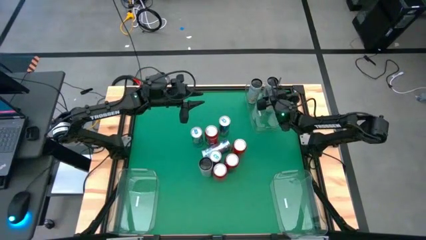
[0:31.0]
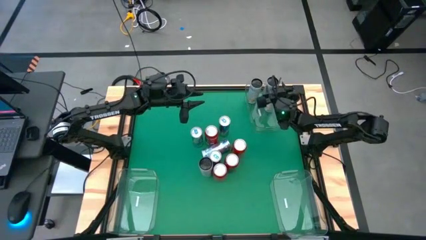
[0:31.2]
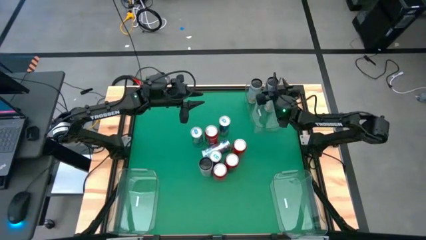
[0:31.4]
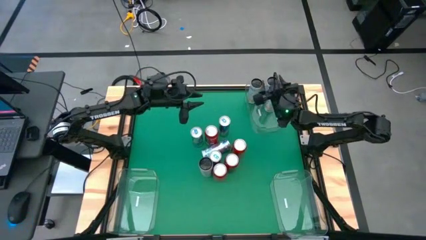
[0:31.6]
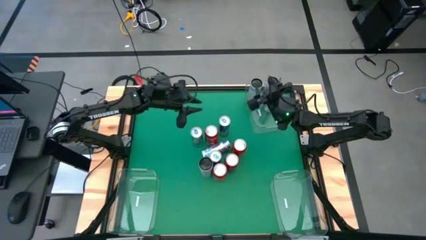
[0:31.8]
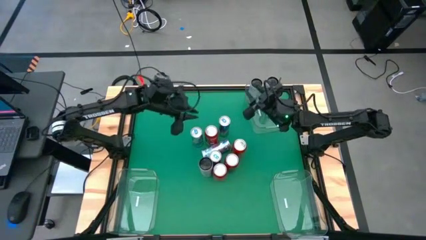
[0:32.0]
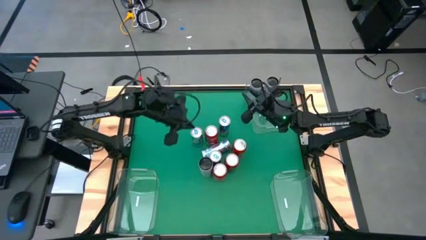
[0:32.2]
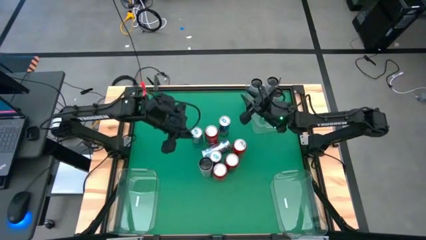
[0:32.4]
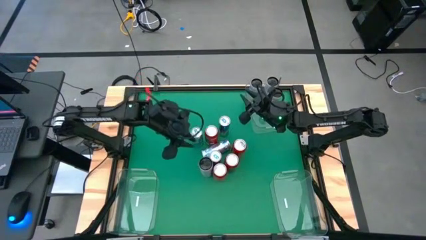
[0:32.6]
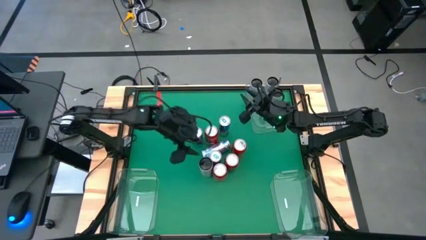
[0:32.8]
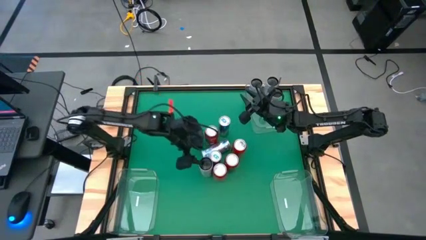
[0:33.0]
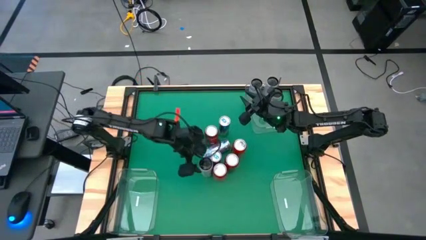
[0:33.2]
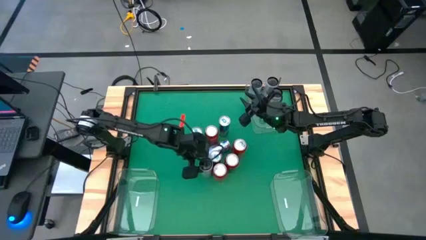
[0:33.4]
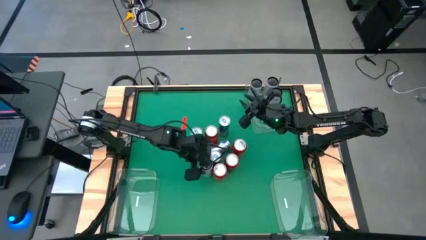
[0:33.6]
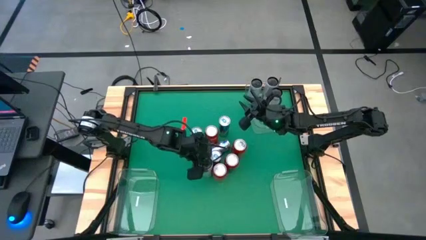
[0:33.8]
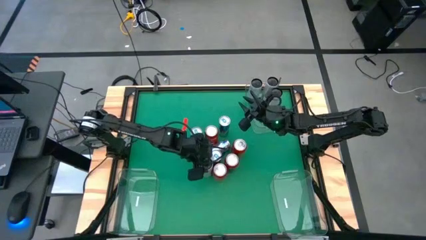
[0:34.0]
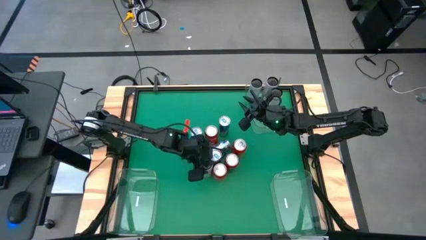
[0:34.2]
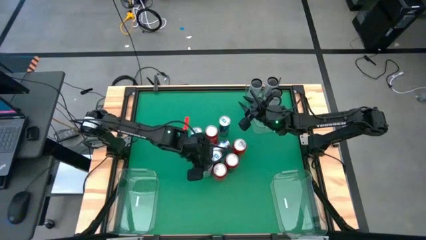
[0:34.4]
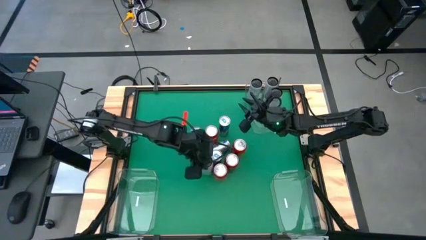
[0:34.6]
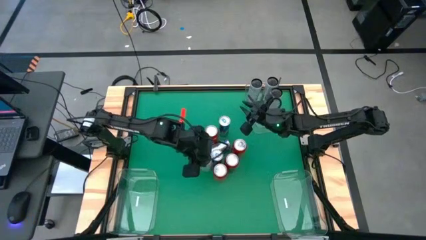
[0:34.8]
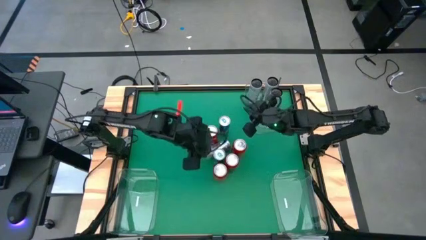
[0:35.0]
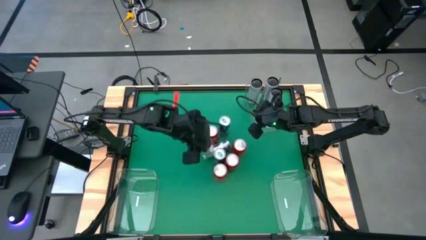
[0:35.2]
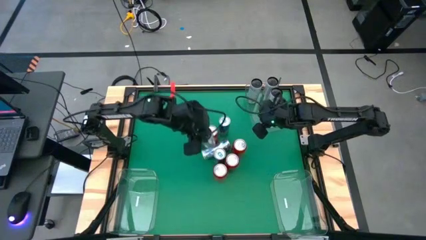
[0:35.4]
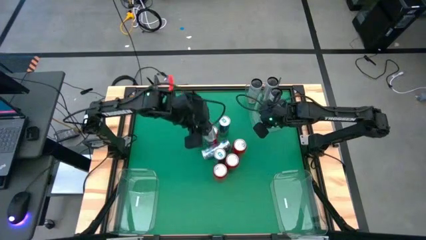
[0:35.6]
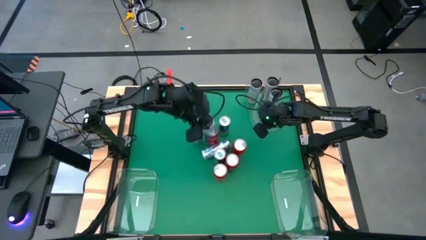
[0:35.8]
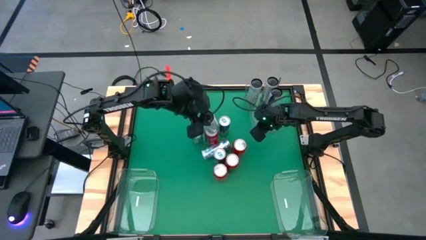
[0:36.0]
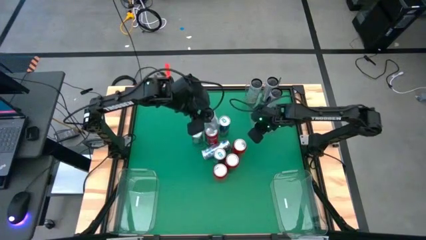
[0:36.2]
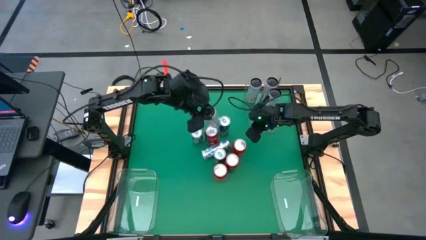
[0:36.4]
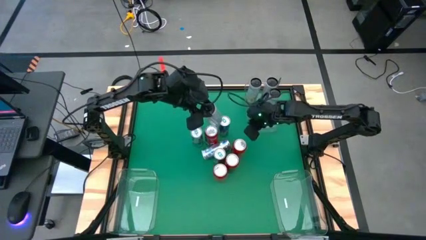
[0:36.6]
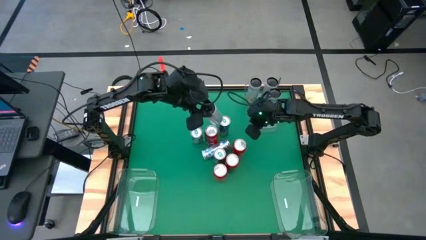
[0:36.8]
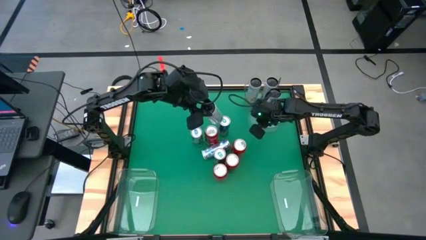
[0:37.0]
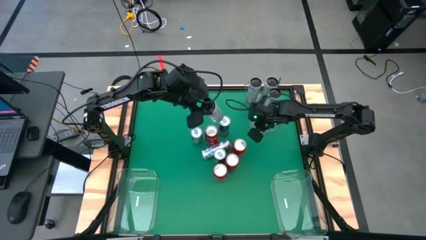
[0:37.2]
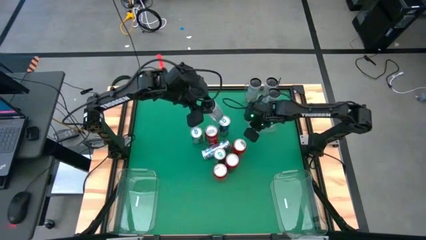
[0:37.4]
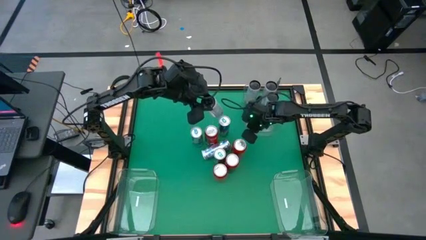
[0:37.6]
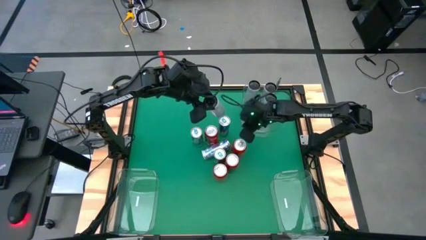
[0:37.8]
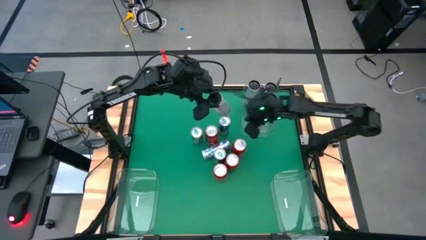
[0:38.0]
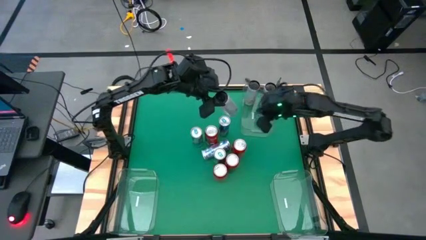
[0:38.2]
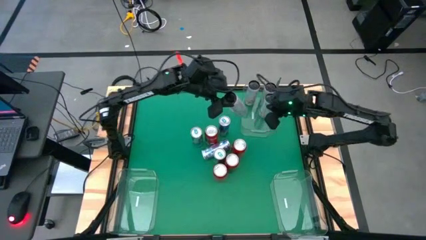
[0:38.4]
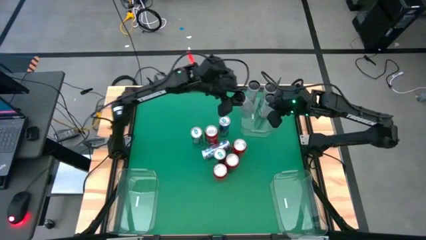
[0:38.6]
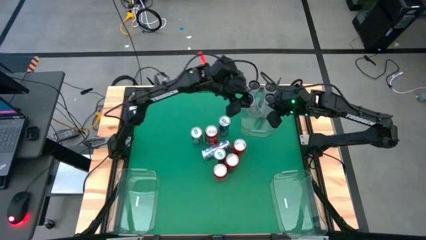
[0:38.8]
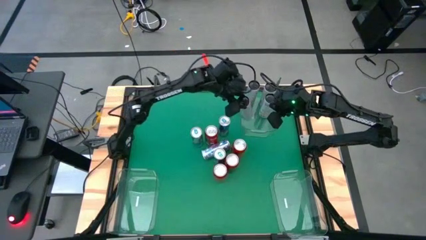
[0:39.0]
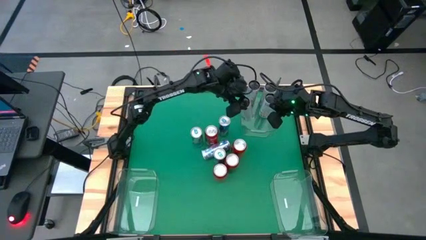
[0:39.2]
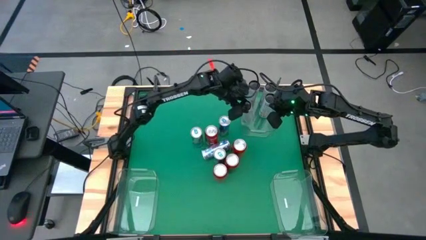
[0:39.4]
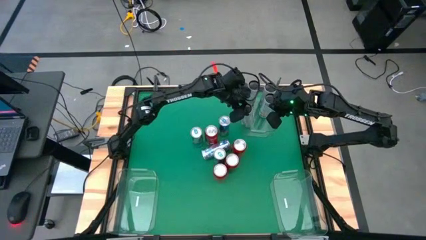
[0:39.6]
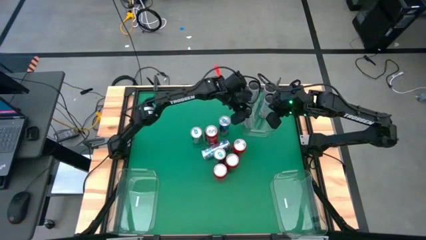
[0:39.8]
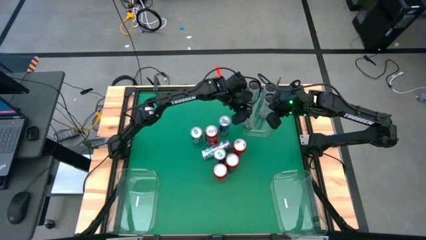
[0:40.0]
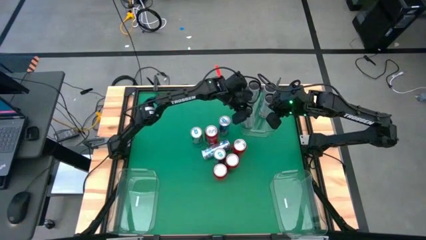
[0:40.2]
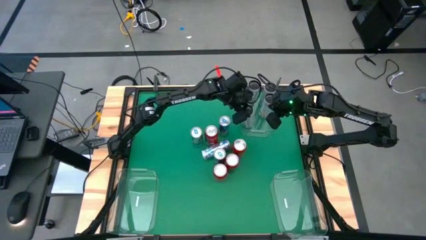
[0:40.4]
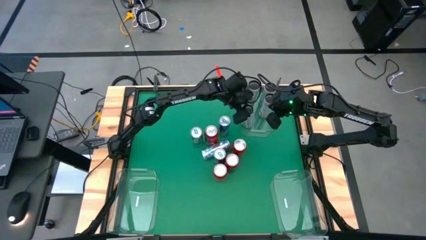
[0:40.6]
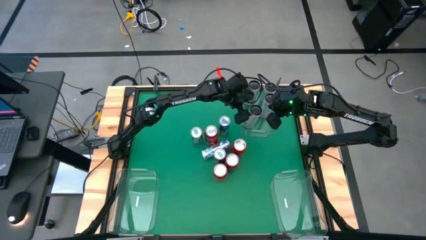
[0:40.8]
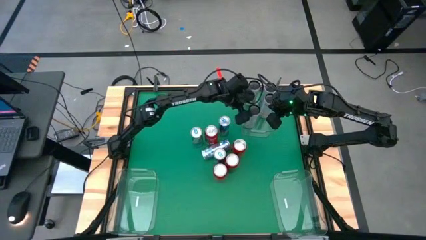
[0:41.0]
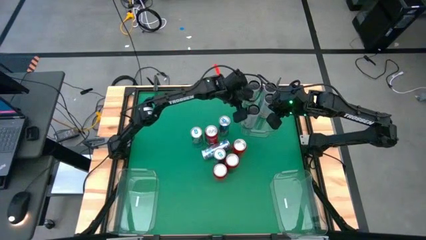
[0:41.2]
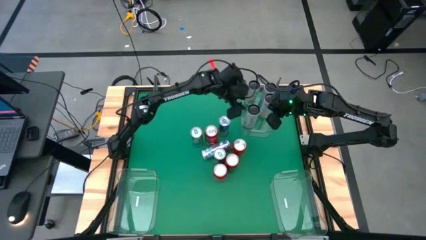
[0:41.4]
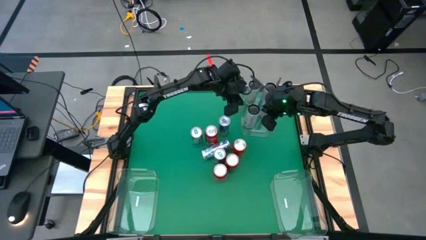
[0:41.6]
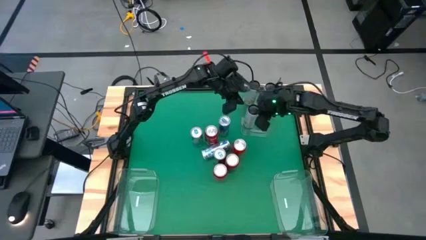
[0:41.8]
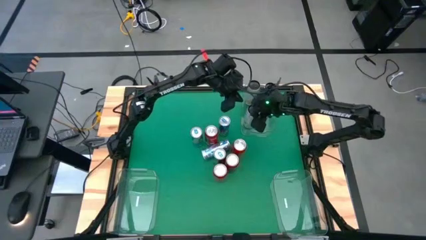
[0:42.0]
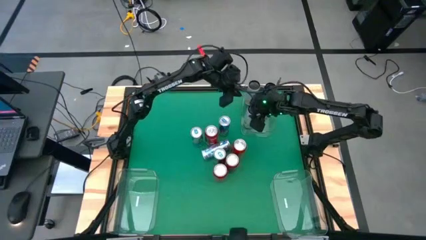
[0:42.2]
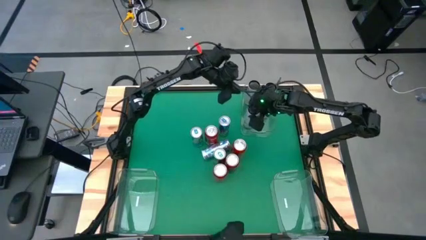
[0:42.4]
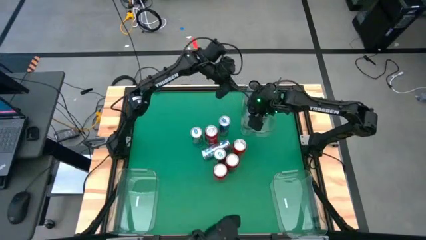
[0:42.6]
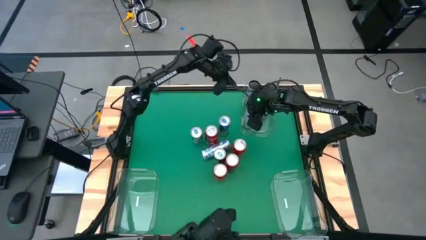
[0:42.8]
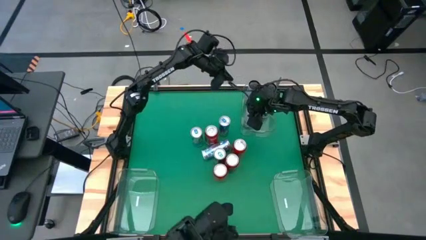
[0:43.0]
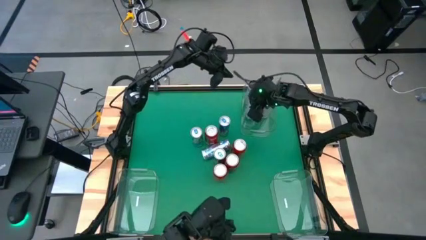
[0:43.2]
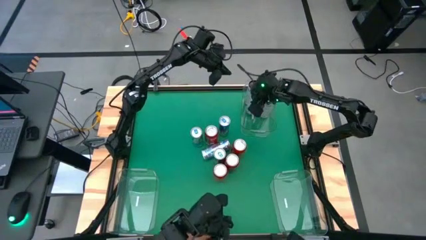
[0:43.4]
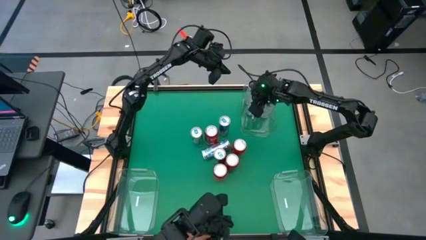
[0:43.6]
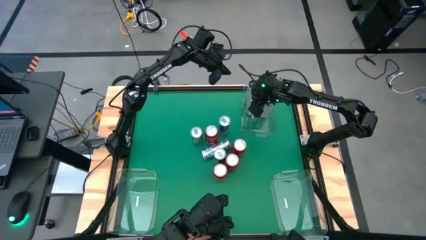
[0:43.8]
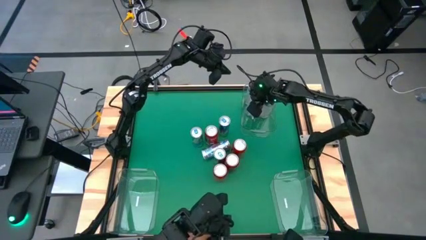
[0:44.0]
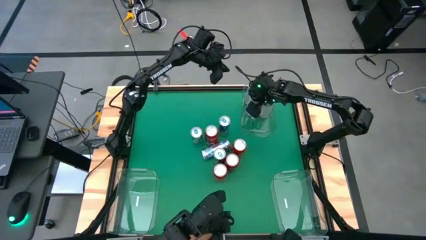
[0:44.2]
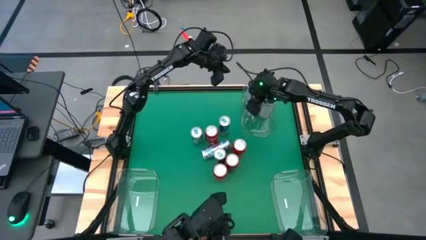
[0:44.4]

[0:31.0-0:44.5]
Task: Sort soda cans
Put the white and yellow soda can into the top transparent bin
